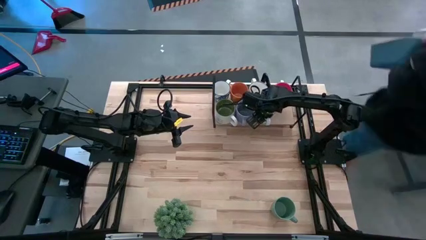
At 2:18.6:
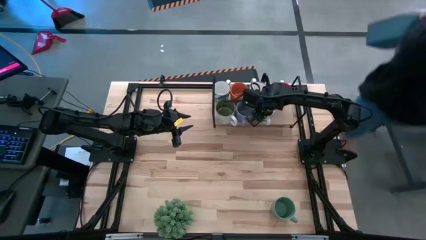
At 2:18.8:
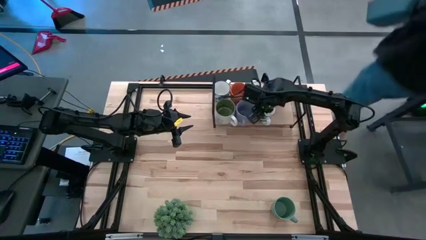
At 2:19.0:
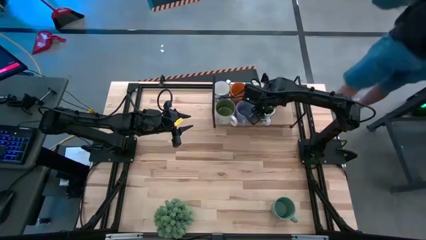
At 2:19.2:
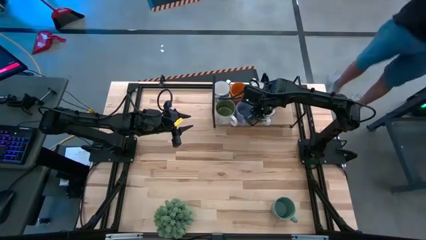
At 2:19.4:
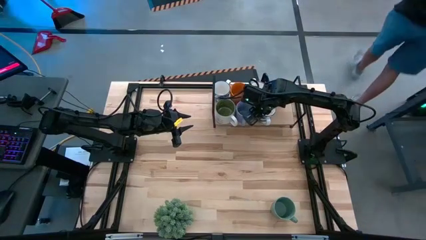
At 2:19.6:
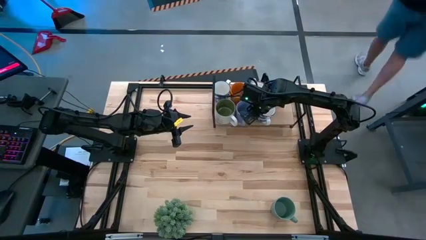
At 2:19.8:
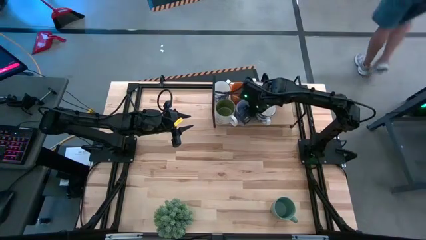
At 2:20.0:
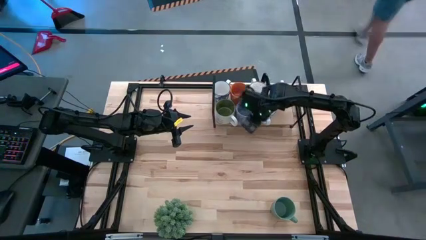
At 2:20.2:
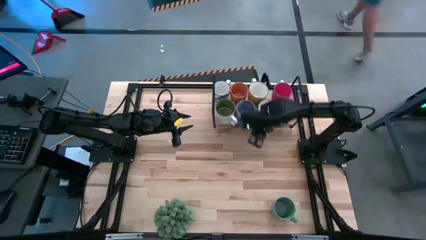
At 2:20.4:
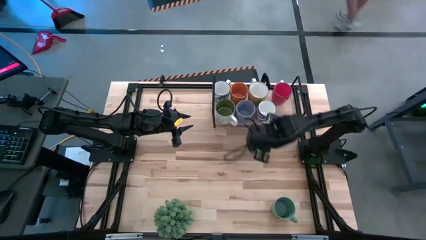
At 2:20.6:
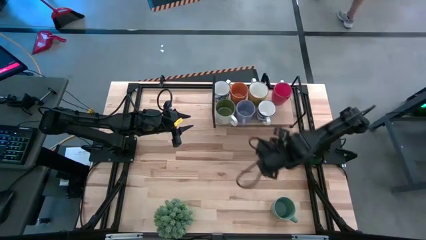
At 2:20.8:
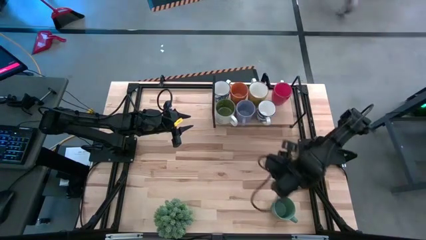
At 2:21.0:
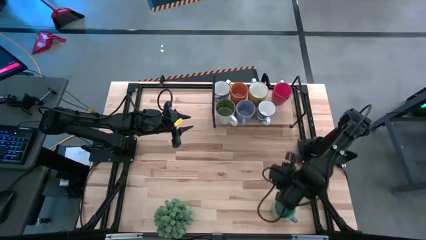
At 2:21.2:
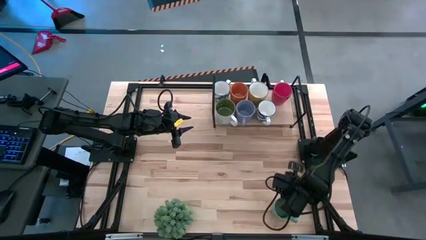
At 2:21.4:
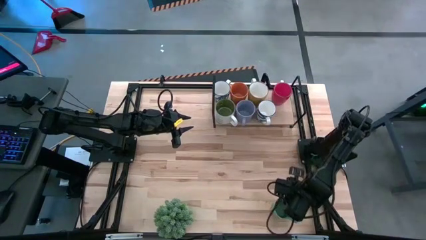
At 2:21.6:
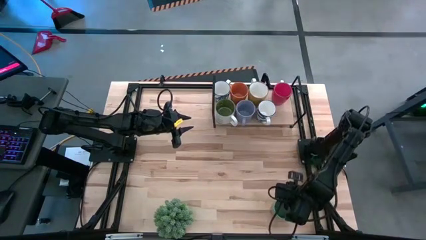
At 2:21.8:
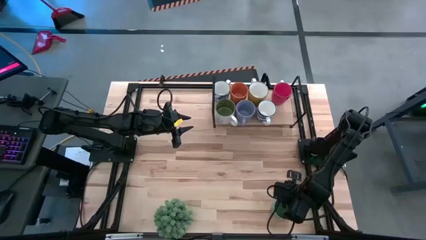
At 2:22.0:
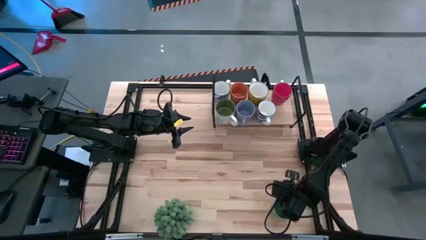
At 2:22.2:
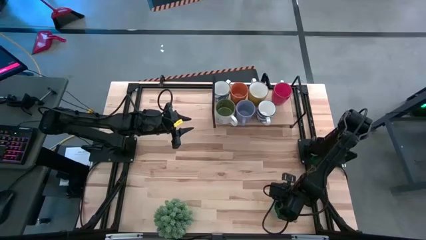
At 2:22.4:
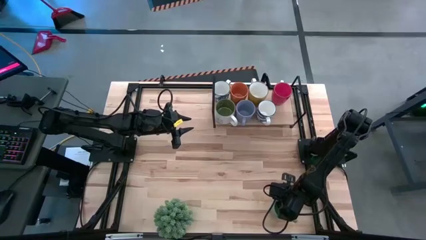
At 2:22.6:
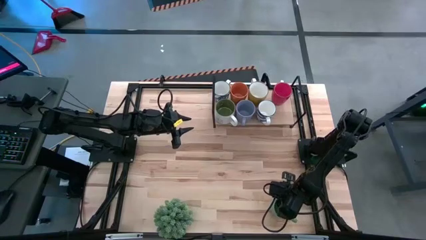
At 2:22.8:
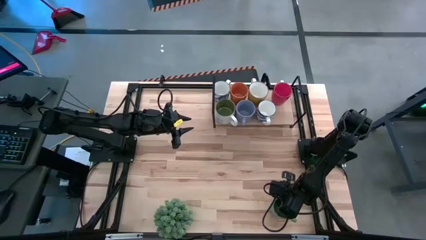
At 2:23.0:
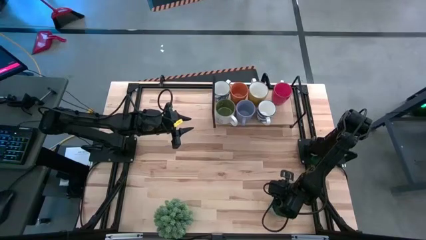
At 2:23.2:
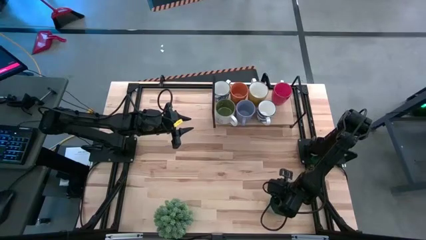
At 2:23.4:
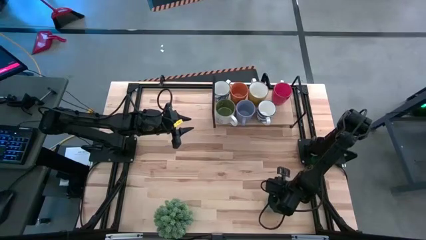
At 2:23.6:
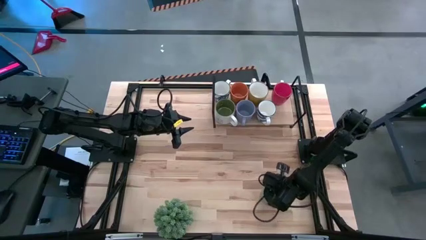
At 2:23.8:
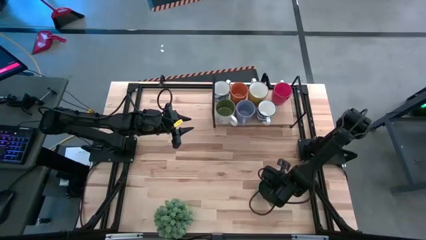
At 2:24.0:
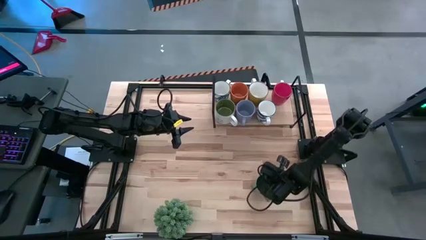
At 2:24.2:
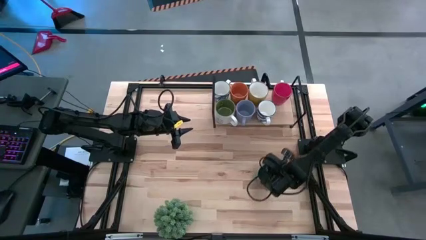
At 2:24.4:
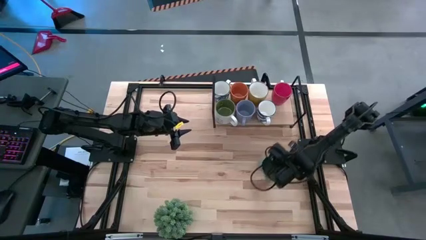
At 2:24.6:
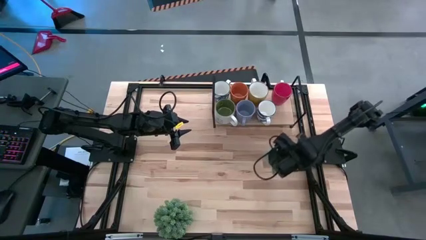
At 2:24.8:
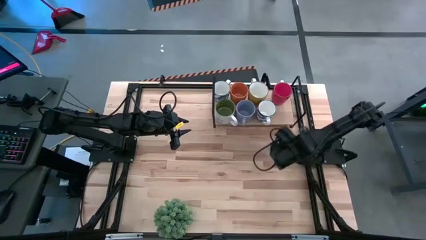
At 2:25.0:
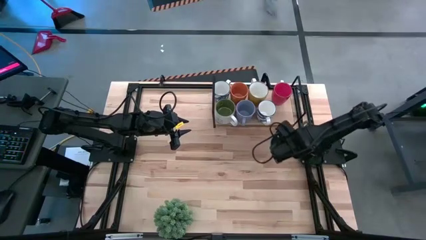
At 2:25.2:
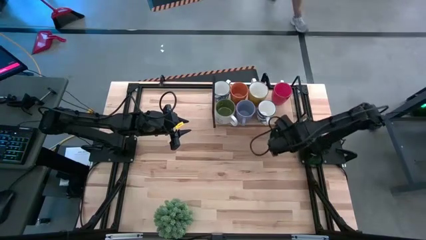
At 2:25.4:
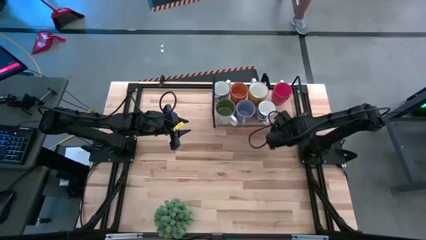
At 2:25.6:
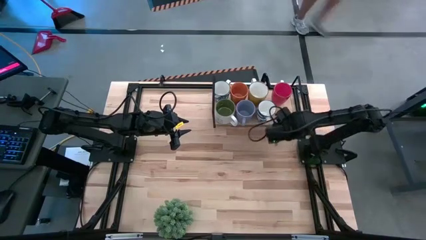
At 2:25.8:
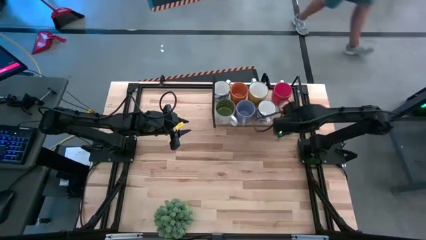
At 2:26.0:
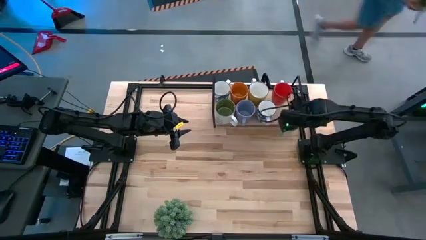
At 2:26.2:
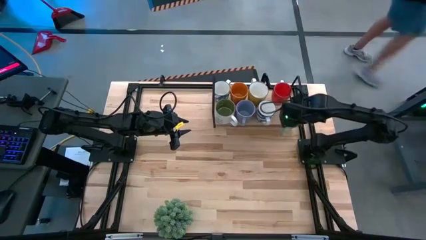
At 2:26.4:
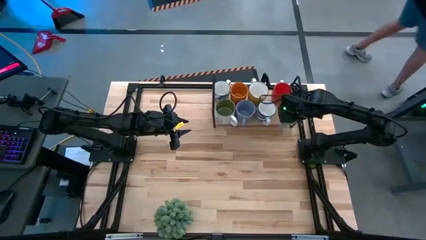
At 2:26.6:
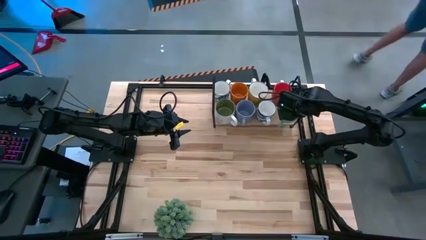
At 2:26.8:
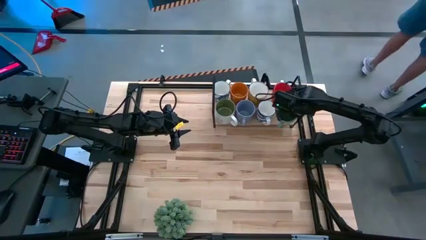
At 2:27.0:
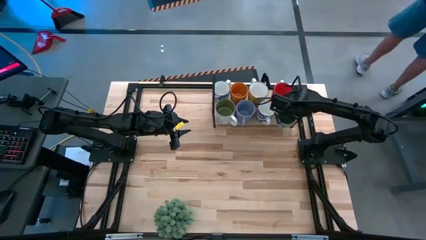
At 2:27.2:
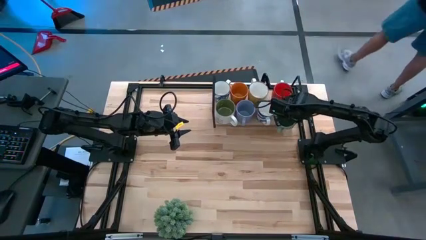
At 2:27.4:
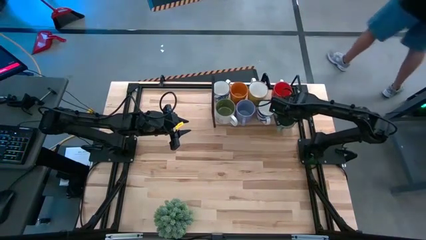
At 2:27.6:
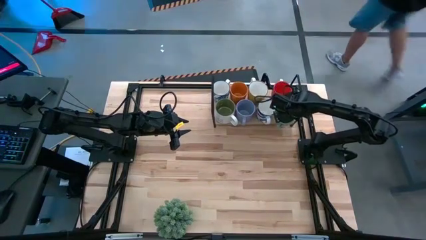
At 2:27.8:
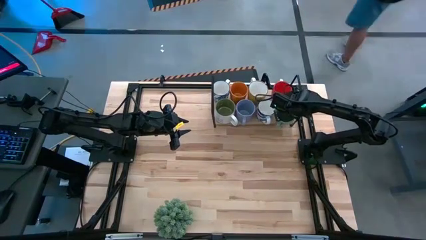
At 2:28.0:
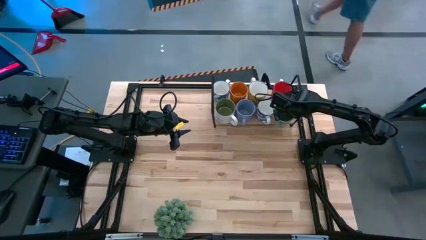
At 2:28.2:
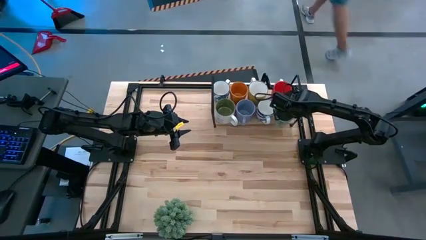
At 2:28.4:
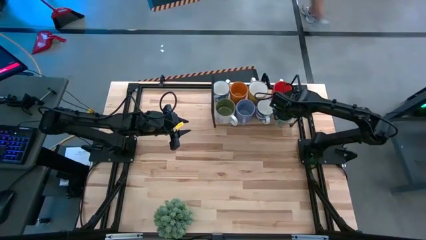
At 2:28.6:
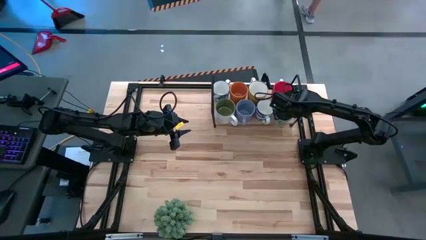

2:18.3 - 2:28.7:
Task: Place coffee mugs
Put the green mug on the shelf

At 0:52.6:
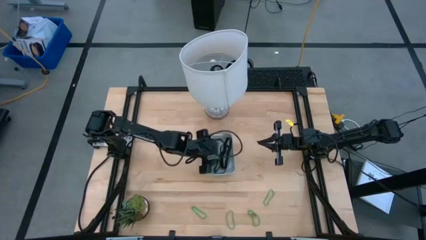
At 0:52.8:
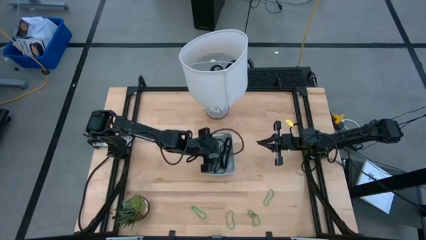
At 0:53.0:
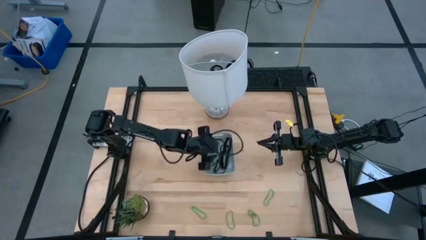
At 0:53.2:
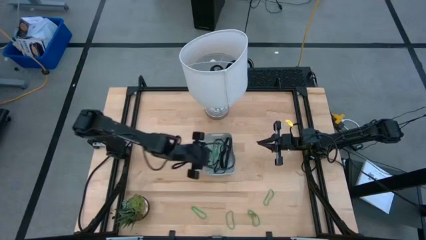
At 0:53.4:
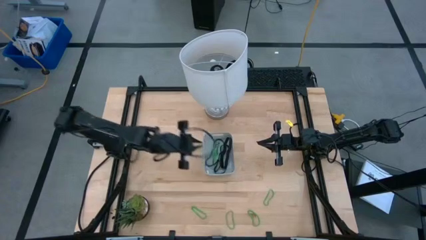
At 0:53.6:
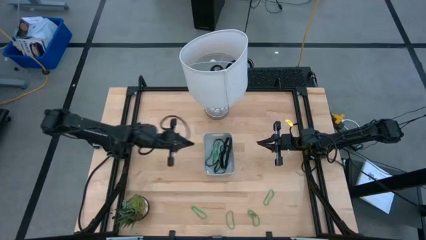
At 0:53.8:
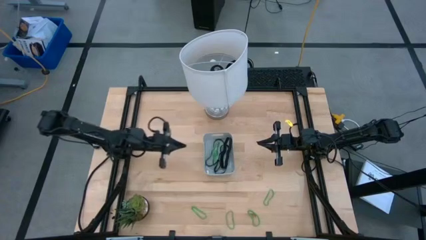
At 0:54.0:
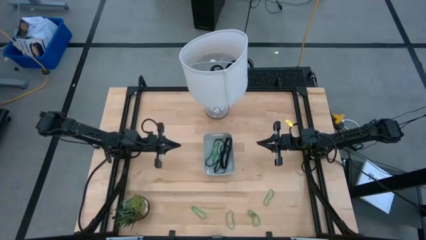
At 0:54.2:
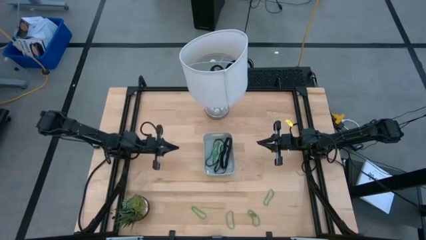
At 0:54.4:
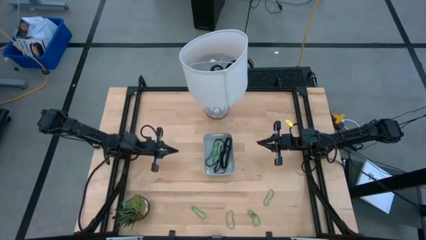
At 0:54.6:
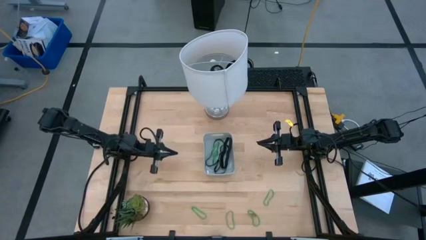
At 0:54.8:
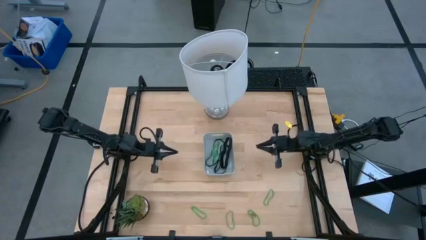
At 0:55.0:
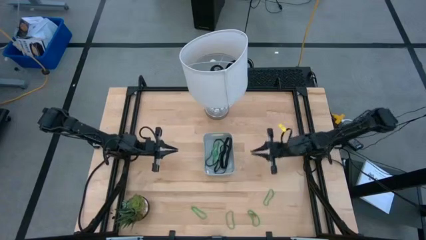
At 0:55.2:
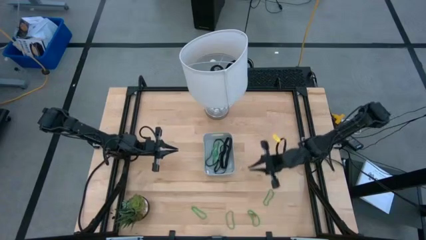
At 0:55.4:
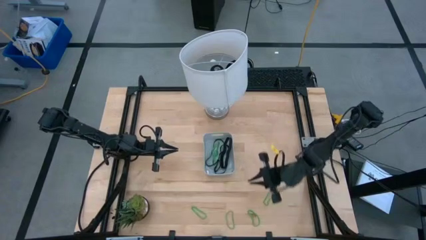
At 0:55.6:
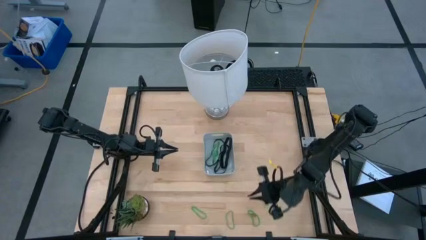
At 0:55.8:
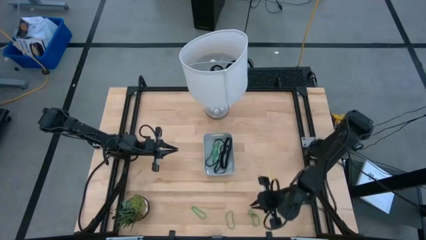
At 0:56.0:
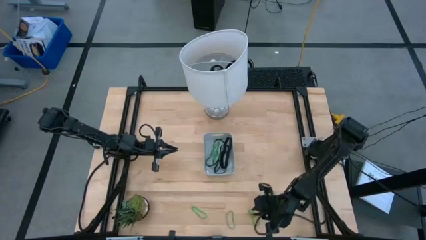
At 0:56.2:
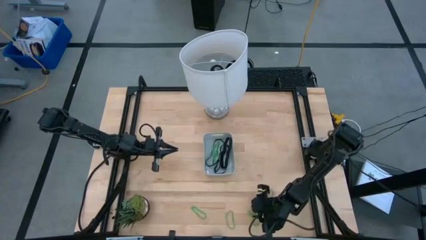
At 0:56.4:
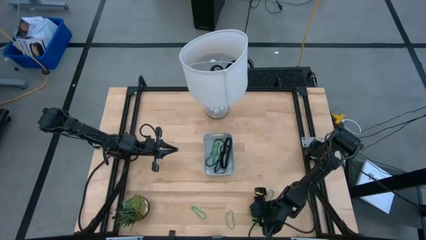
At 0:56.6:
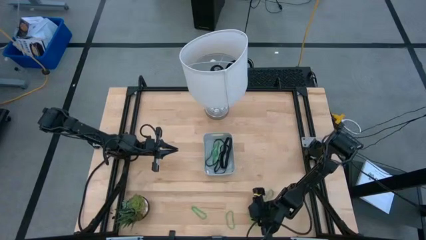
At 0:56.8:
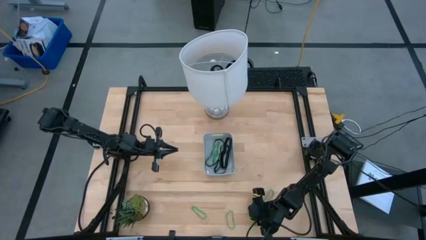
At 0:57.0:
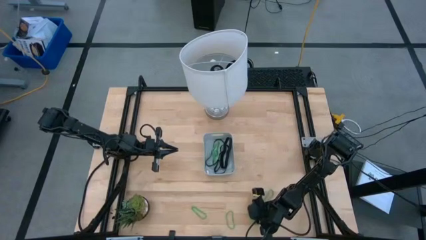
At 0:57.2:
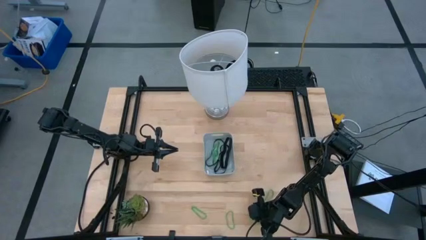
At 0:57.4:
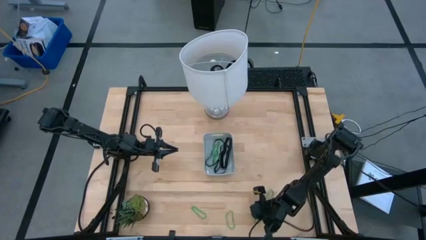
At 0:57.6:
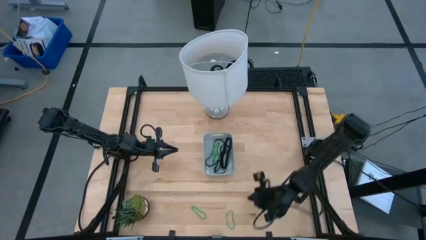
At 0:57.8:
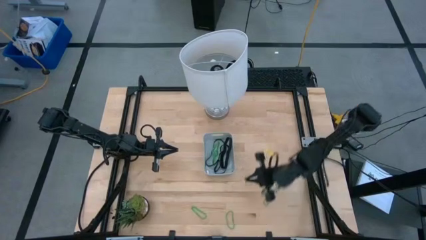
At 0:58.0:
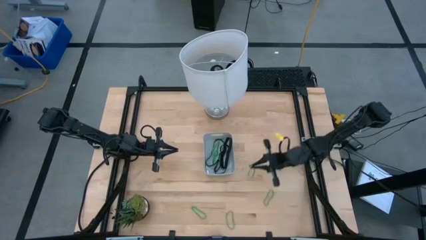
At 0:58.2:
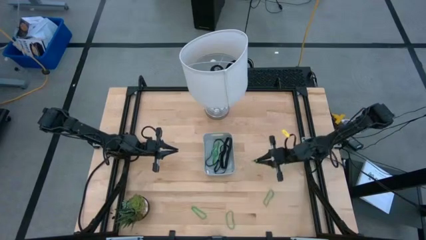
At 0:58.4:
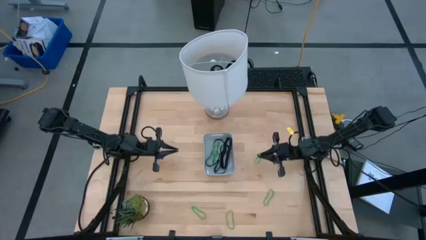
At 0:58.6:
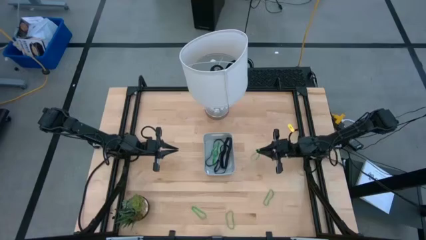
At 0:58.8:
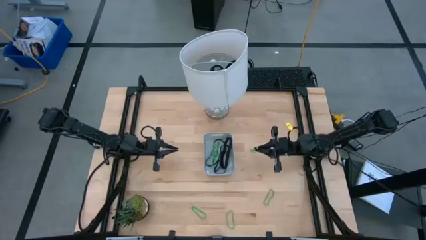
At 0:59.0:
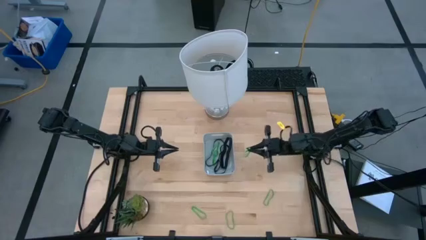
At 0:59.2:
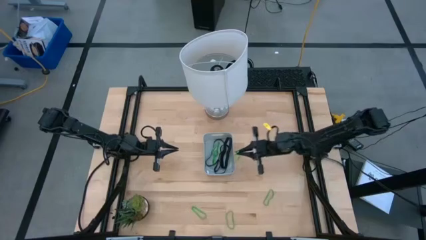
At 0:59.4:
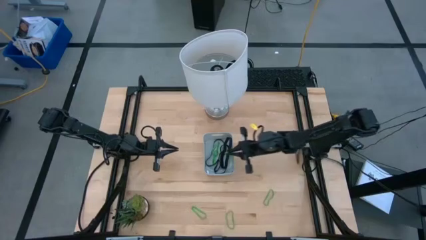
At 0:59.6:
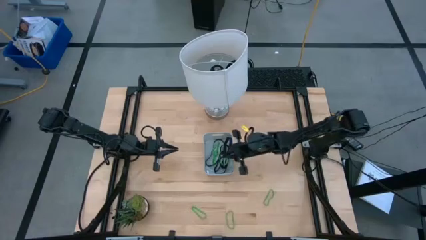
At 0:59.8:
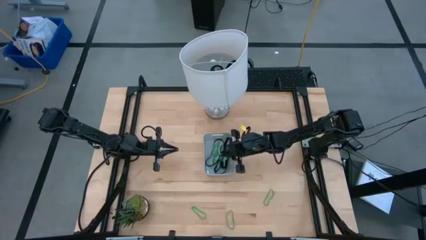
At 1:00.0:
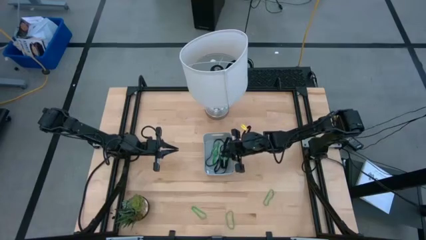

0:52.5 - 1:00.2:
Task: Pick and place rubber bands into bin
Put the green rubber band into the gray bin
